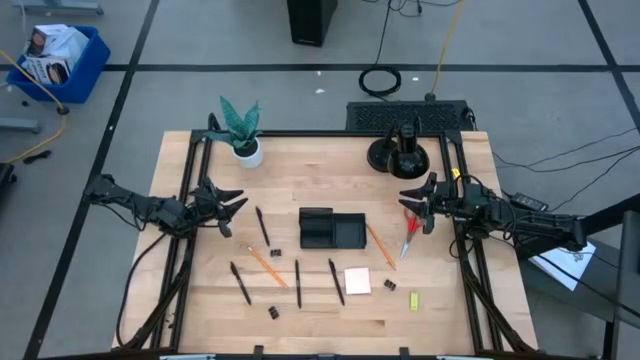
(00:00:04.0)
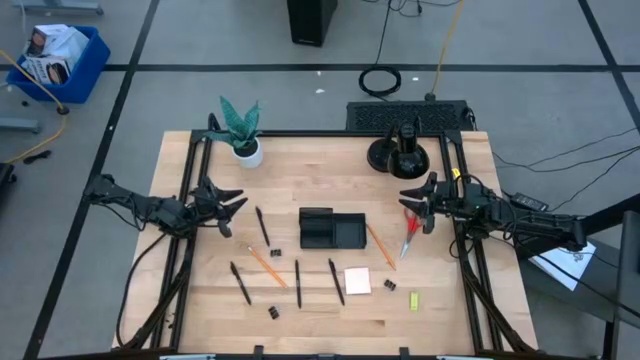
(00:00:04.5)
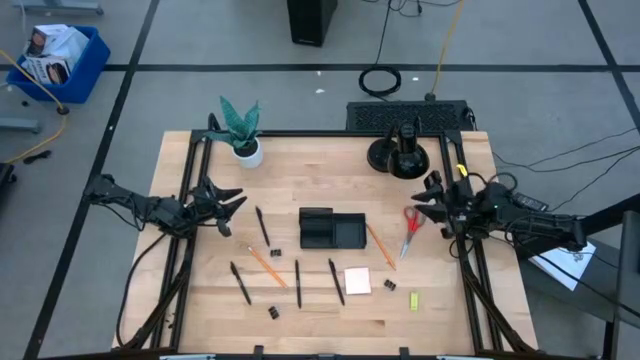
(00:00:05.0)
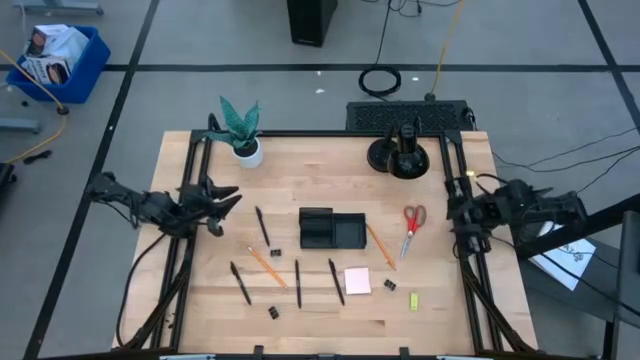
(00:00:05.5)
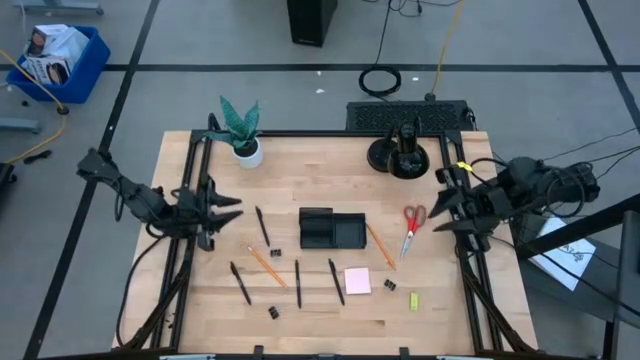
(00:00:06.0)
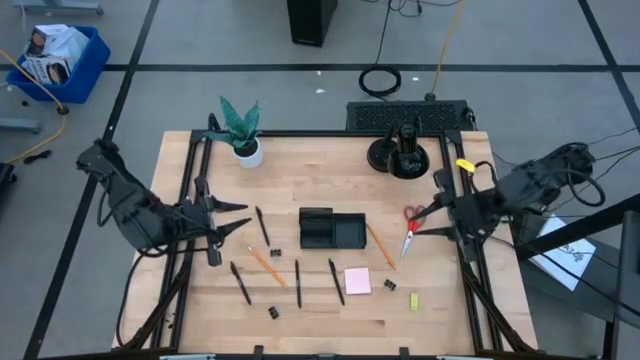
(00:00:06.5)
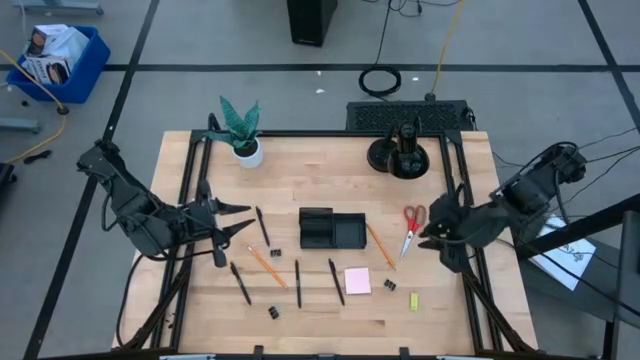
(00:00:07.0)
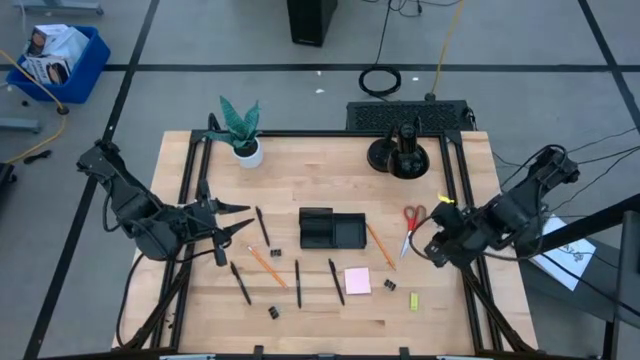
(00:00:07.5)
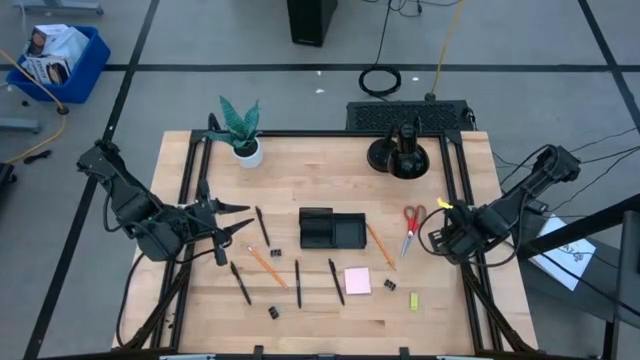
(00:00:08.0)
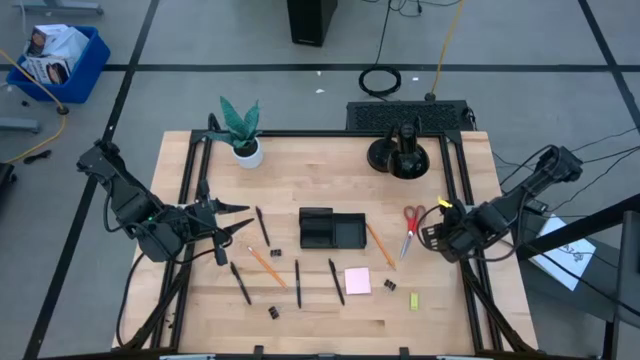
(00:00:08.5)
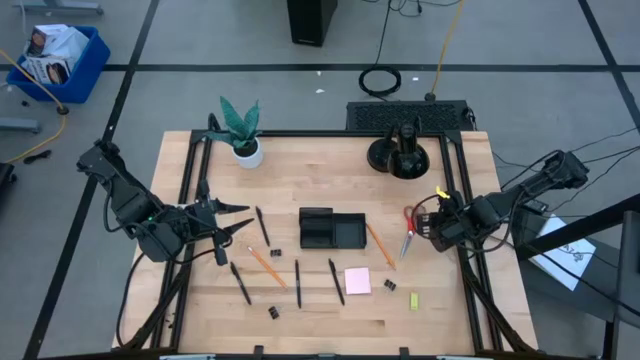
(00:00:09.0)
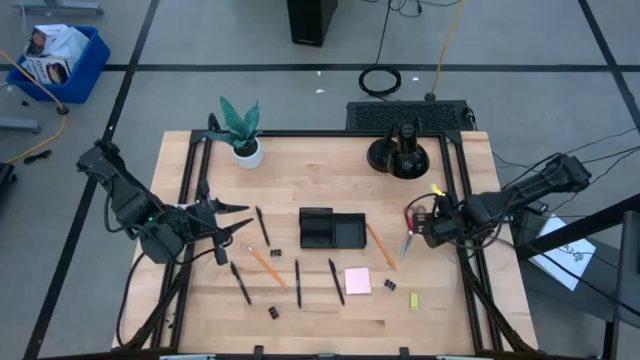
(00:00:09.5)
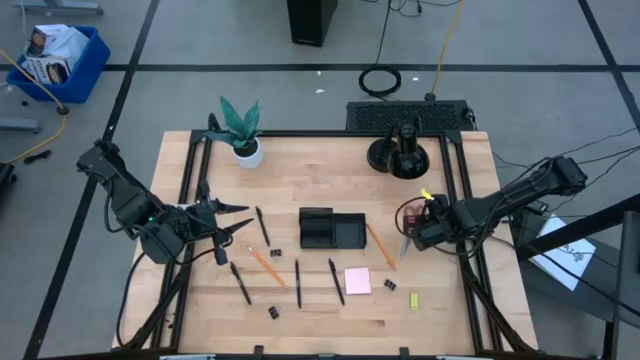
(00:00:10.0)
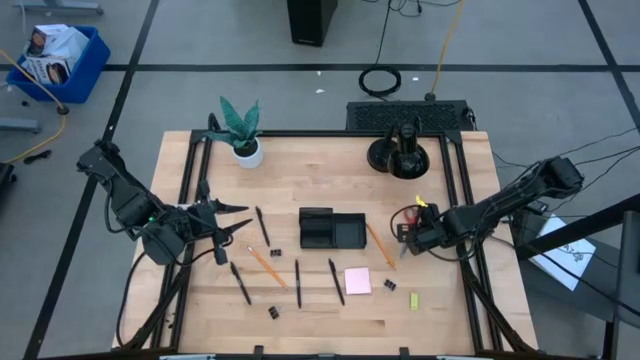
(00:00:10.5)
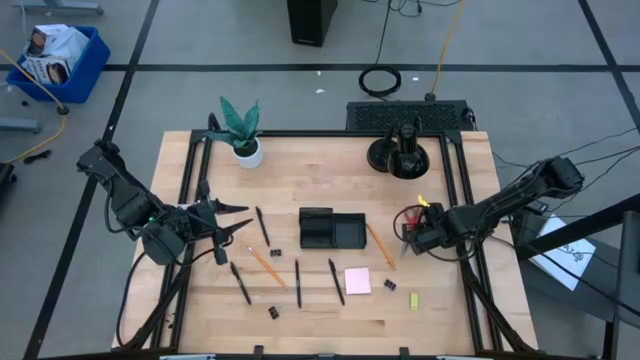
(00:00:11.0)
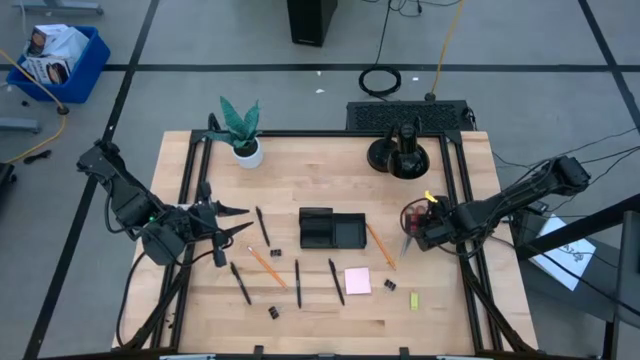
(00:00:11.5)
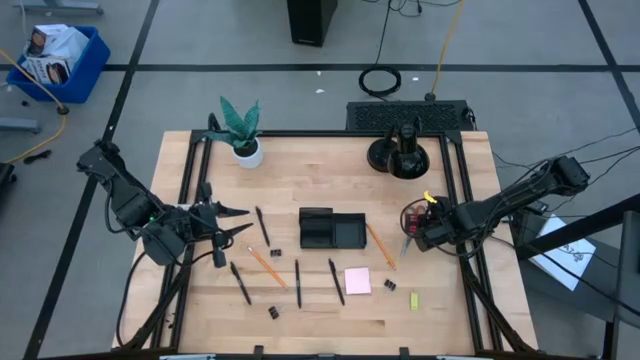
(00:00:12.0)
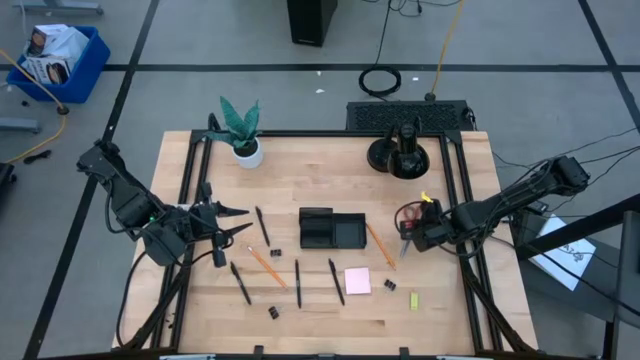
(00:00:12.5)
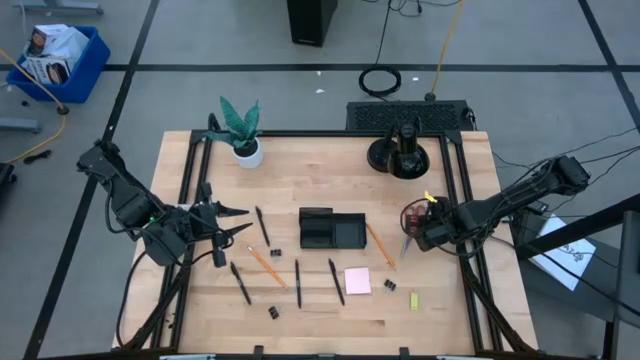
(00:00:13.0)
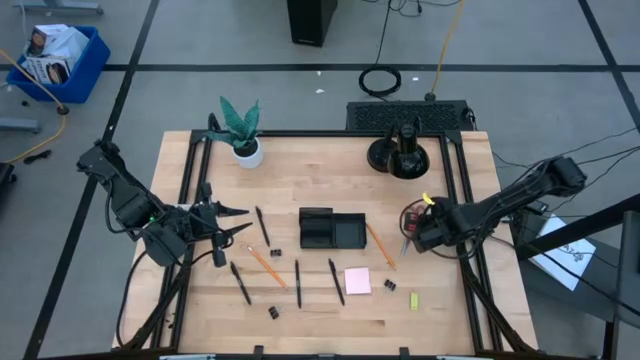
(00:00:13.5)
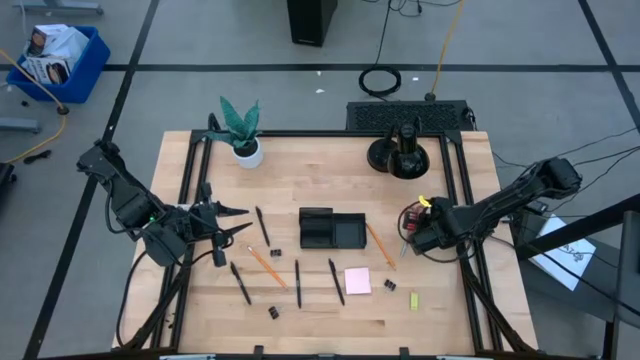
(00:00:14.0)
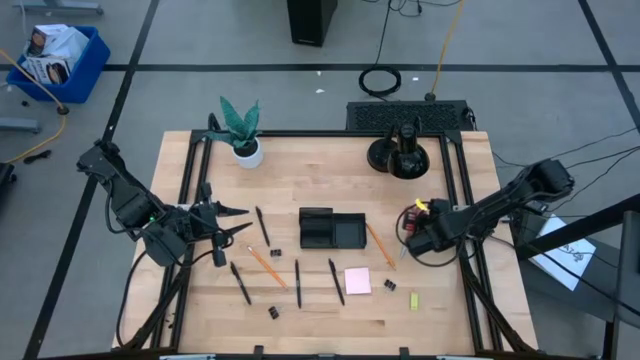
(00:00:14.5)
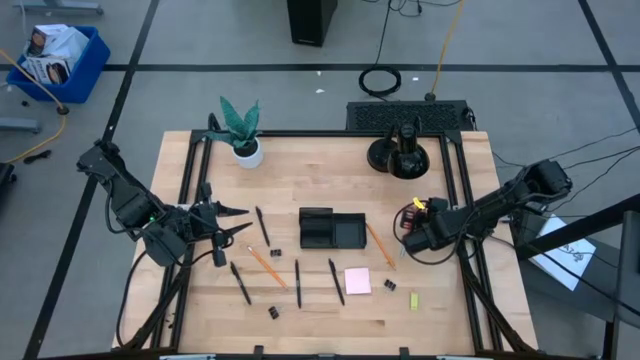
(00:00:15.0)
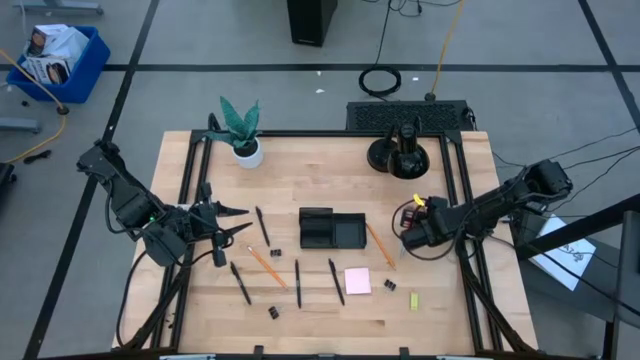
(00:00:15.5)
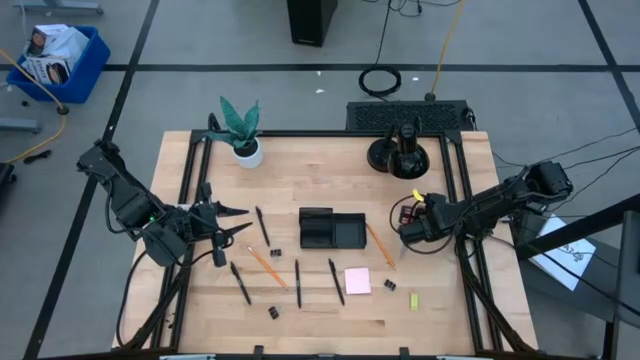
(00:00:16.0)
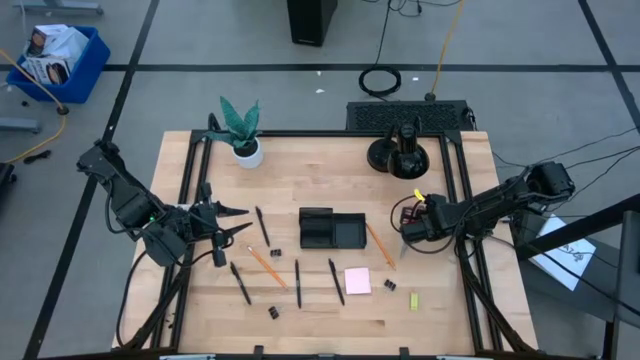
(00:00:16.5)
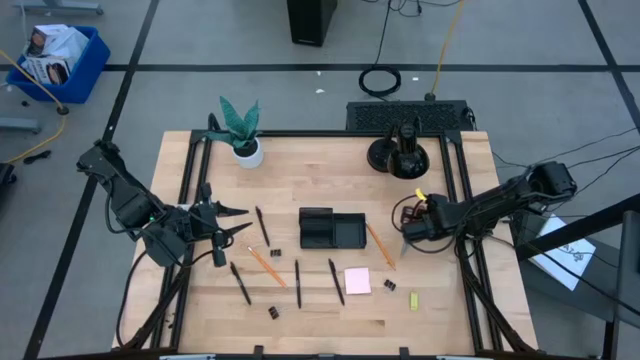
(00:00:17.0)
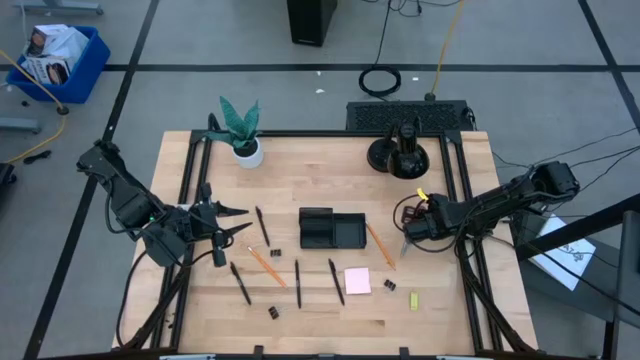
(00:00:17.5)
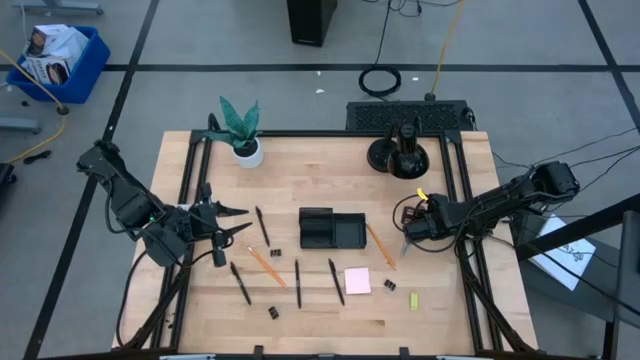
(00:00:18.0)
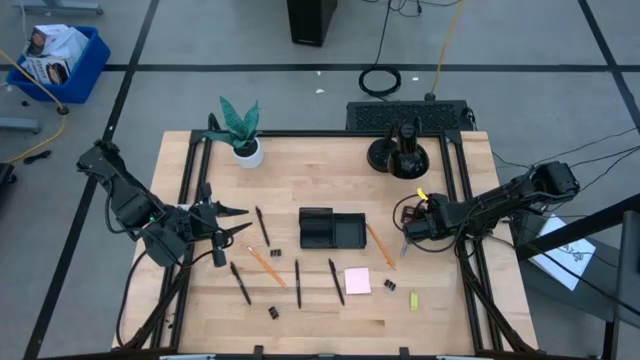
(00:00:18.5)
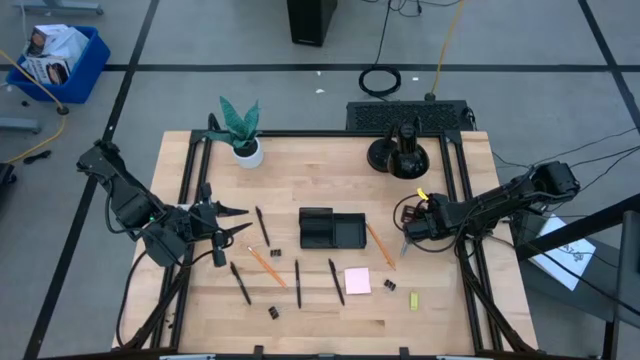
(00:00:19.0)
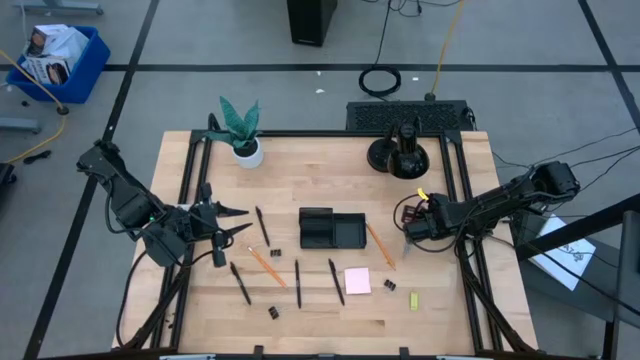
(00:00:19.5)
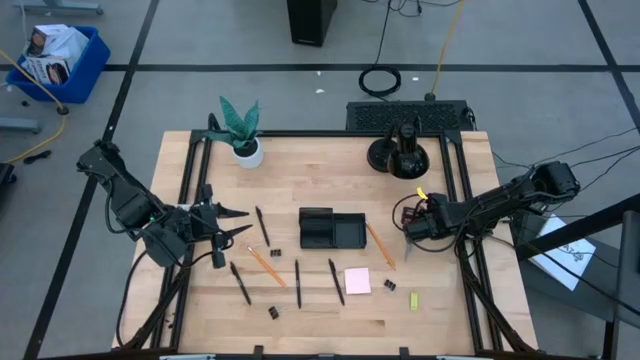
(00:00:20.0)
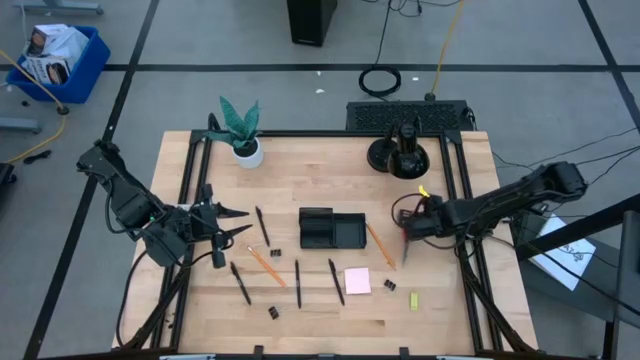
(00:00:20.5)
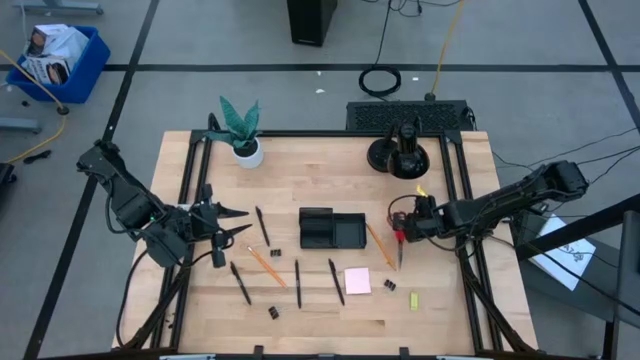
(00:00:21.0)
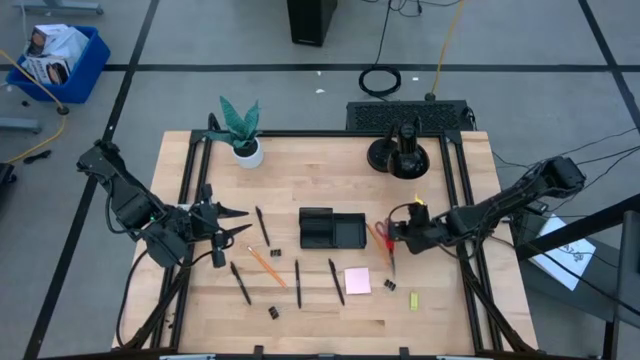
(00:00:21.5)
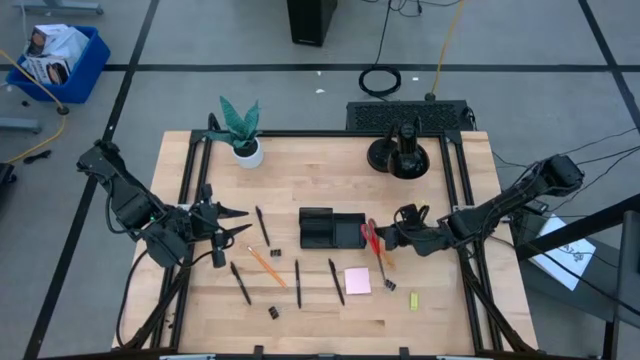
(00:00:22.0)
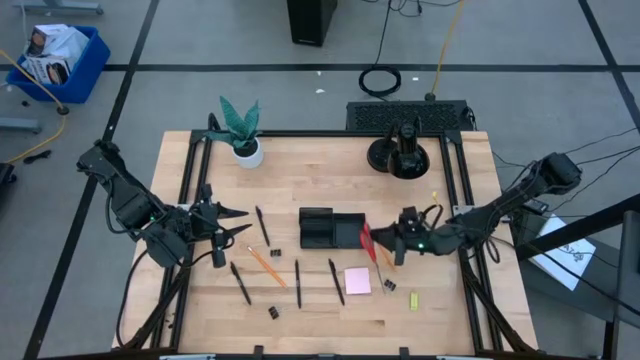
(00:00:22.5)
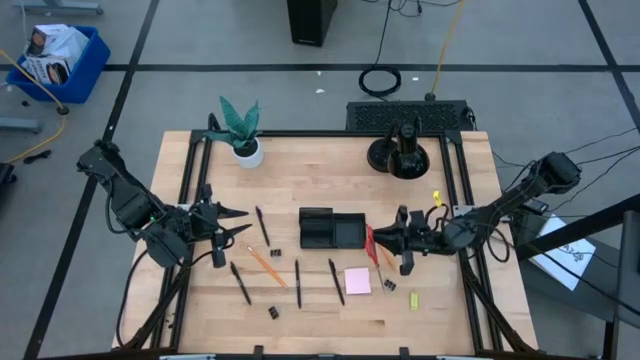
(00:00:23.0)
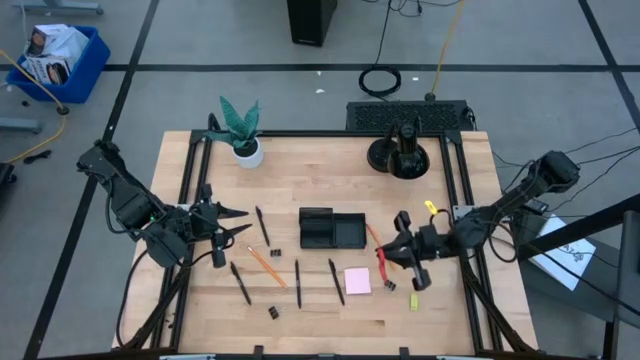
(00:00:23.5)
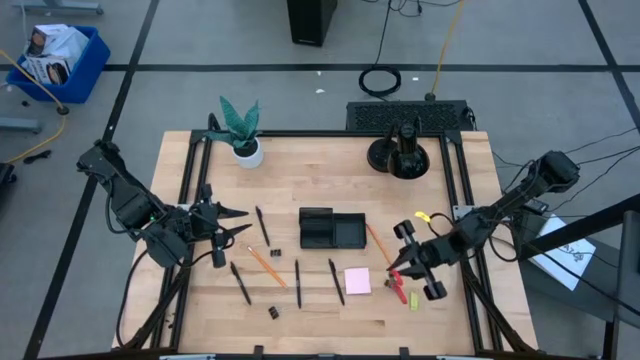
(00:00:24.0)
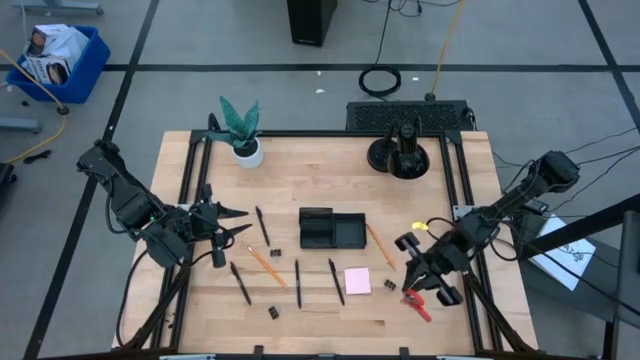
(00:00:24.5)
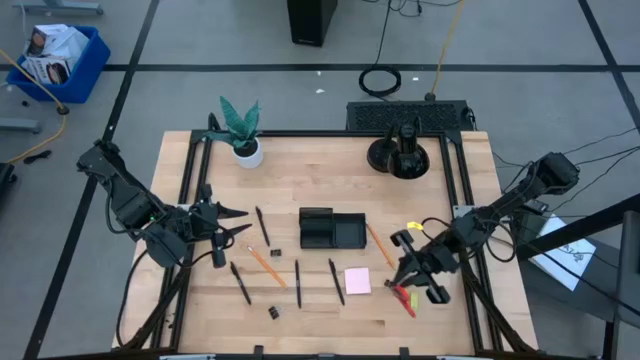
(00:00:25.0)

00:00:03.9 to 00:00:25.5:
Task: Pick and place office supplies into organizer
Put the scissor into the desk organizer
